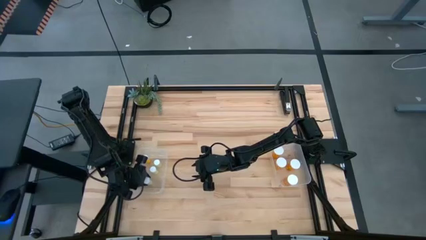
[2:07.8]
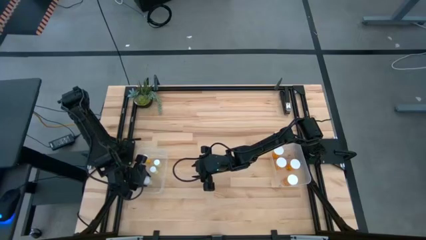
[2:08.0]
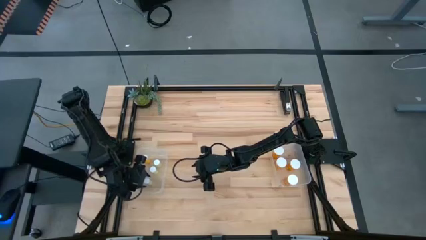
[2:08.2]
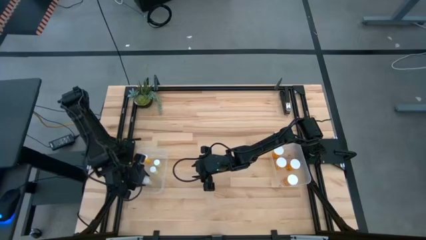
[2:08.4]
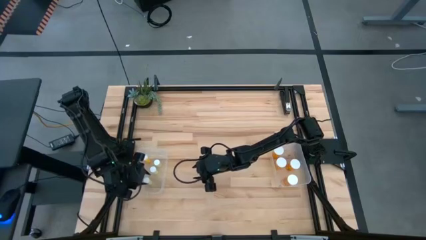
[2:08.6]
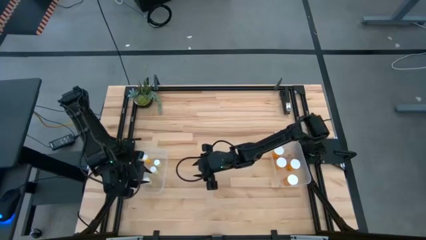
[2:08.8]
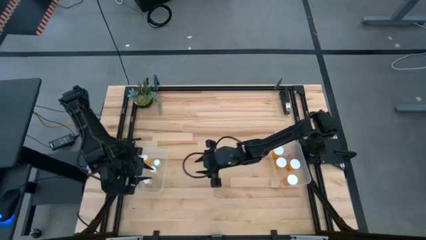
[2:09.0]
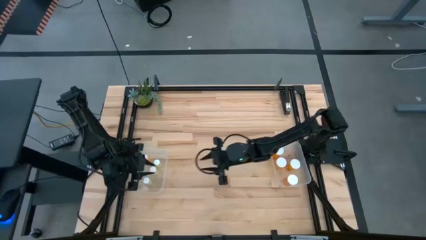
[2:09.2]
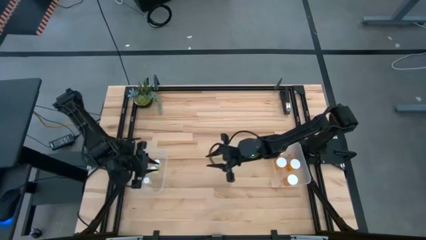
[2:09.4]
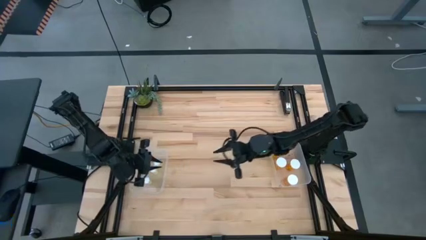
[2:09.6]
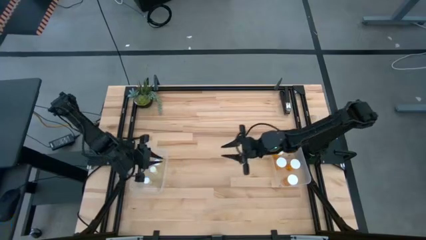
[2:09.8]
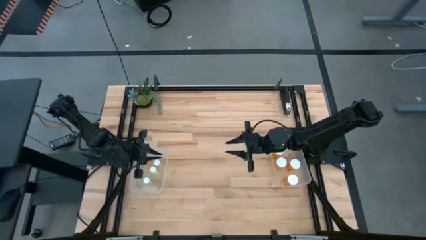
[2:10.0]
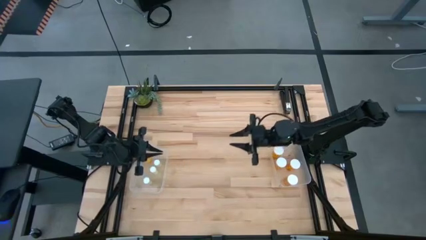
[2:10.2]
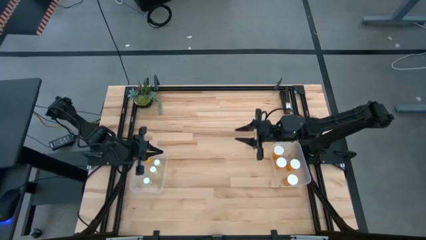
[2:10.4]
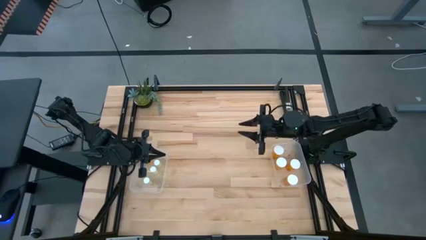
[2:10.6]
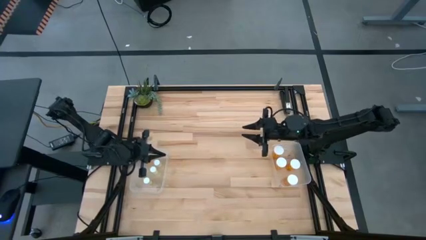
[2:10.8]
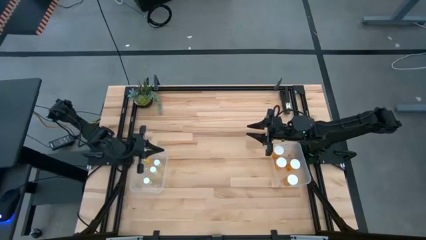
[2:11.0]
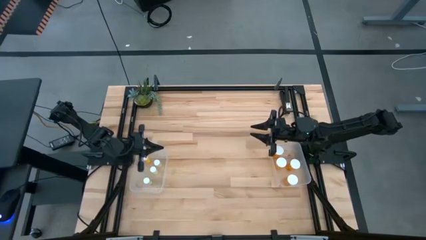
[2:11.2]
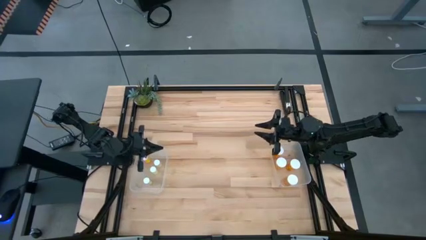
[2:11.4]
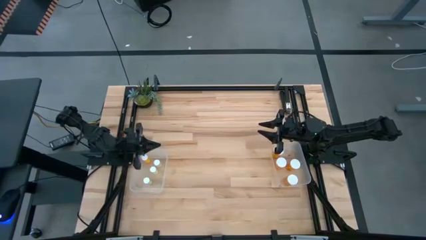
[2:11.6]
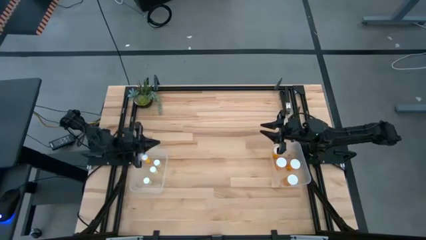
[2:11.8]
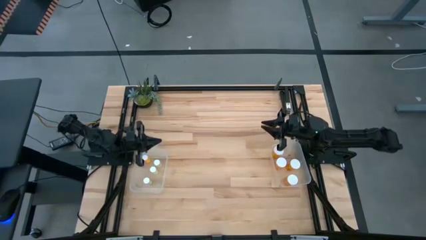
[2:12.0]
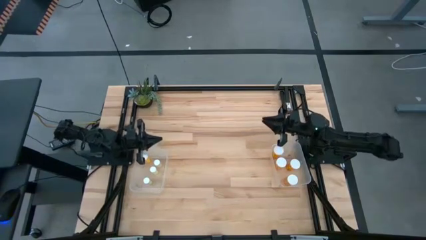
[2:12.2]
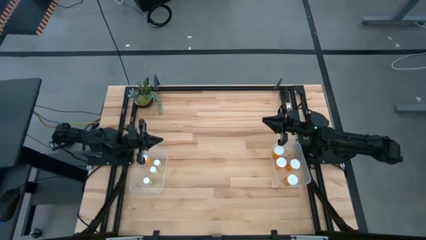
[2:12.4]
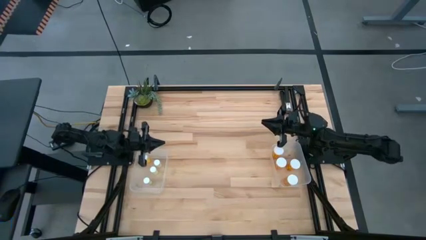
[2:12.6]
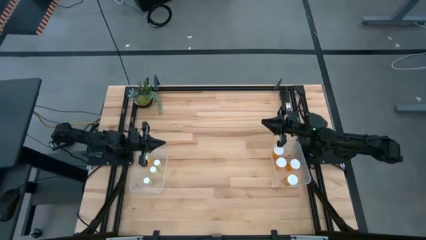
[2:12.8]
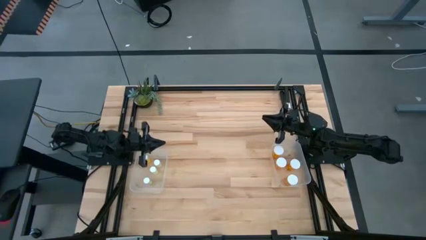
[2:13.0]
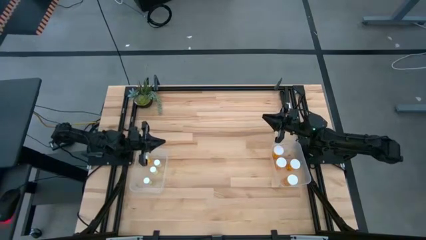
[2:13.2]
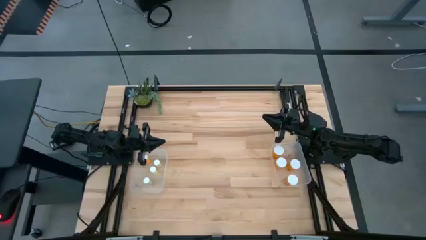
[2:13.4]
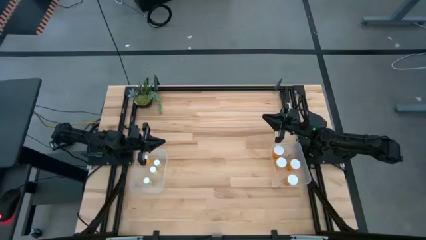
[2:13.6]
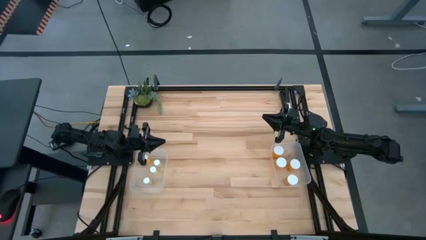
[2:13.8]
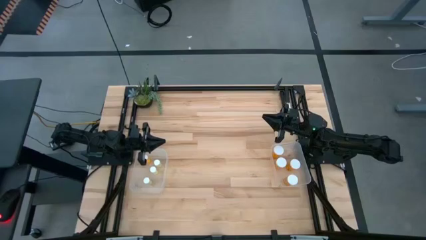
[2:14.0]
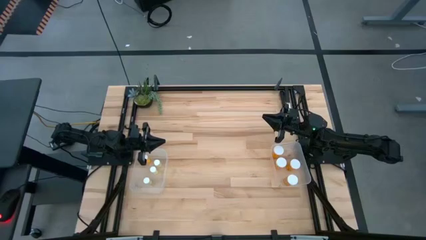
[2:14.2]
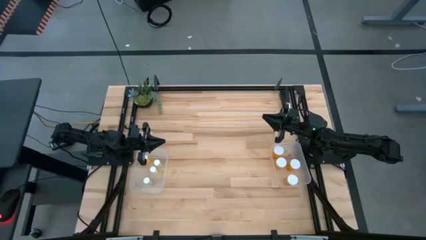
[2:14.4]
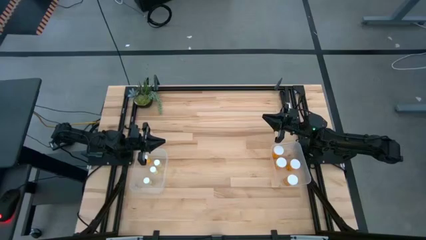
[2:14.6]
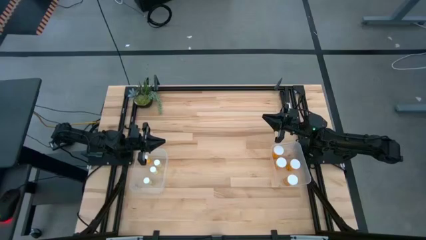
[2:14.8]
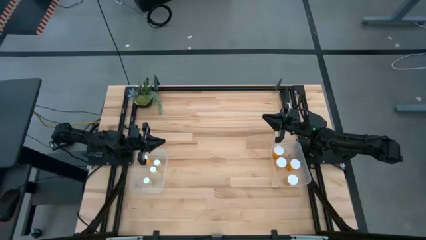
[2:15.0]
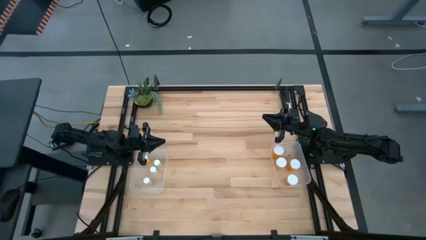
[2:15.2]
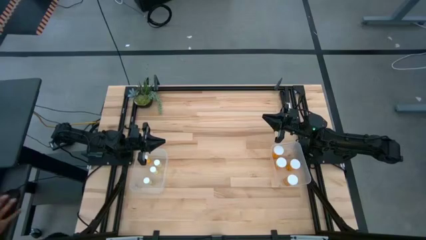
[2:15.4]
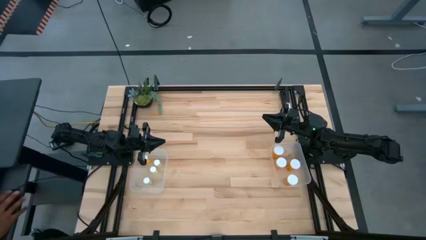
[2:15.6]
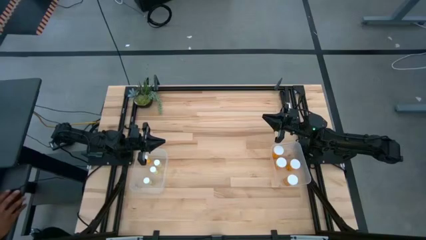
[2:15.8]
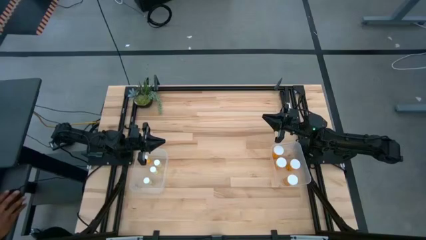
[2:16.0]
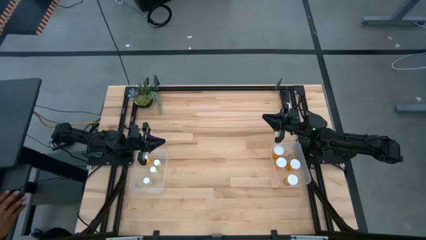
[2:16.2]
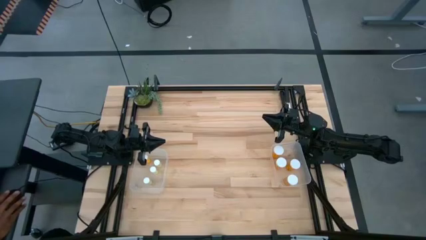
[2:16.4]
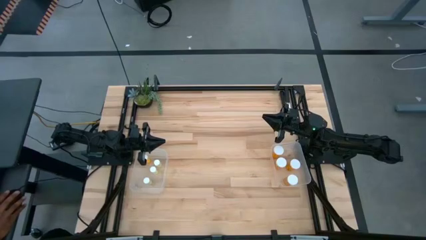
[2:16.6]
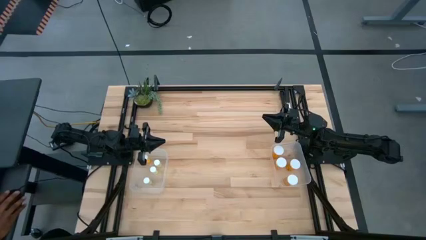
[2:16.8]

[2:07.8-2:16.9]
Task: Pick and place medicine bottles into bin by pill shape (circle, oval)
Return to Home Position

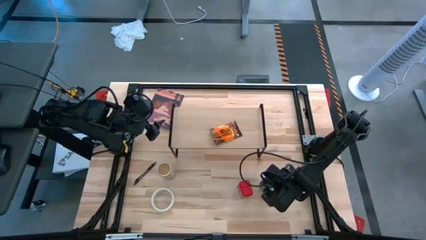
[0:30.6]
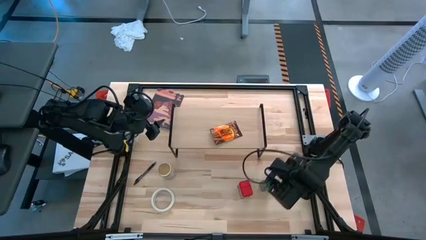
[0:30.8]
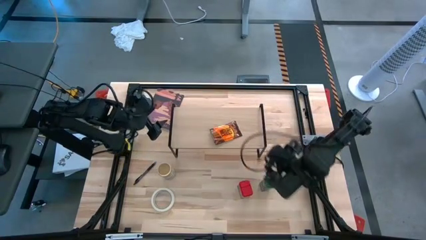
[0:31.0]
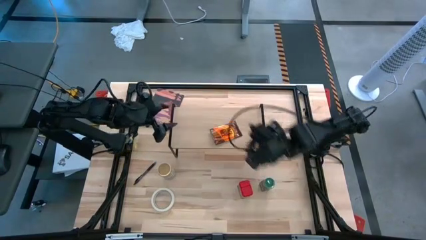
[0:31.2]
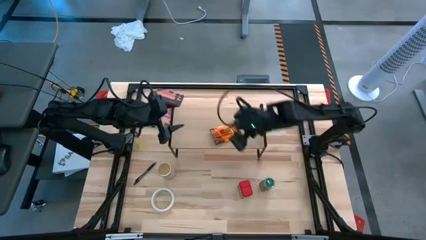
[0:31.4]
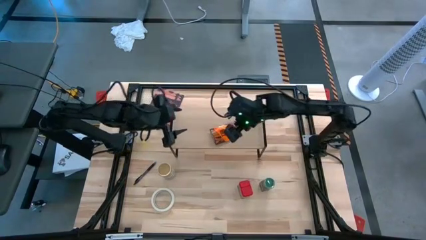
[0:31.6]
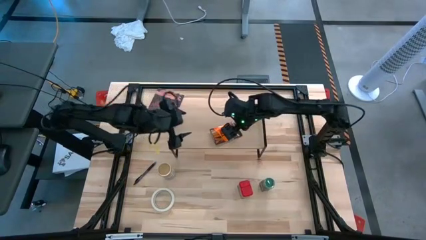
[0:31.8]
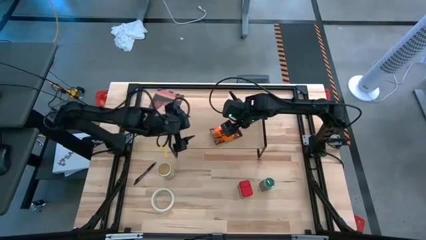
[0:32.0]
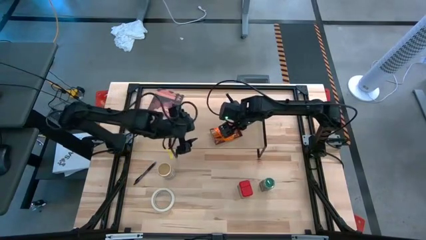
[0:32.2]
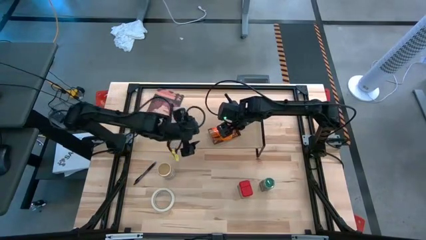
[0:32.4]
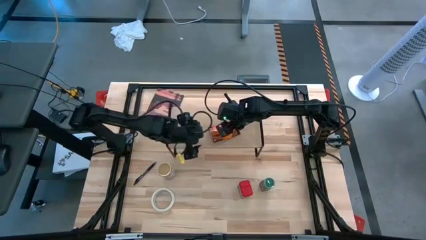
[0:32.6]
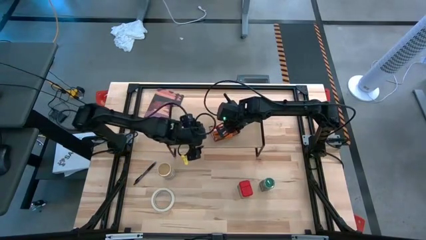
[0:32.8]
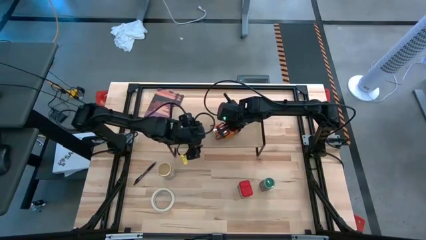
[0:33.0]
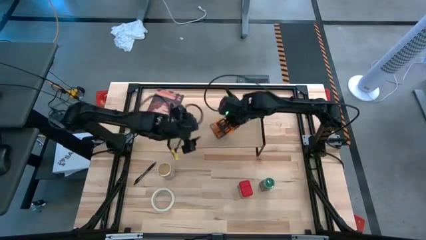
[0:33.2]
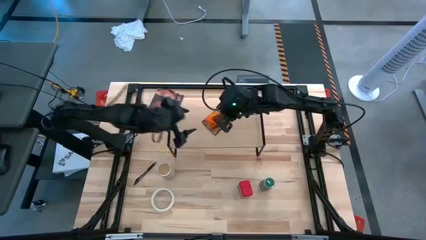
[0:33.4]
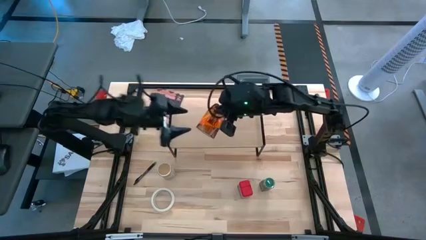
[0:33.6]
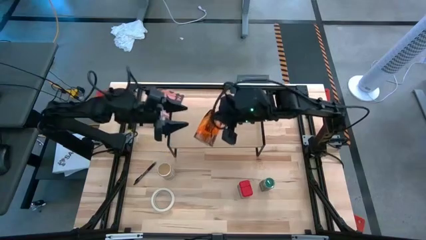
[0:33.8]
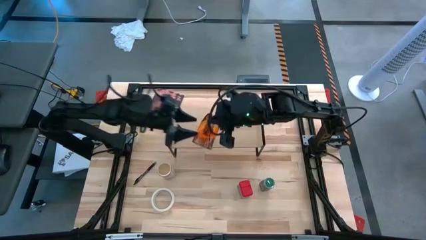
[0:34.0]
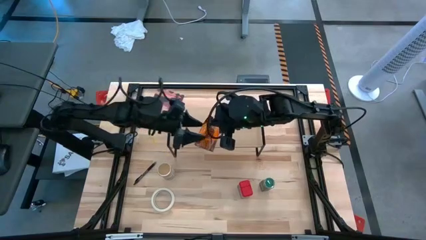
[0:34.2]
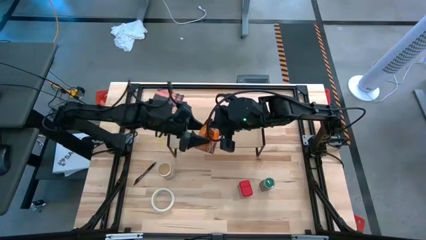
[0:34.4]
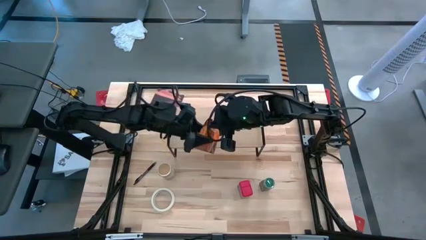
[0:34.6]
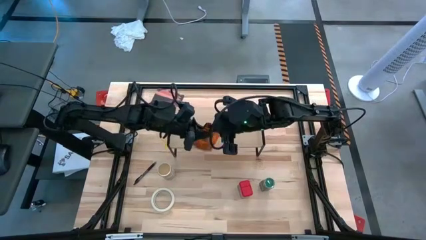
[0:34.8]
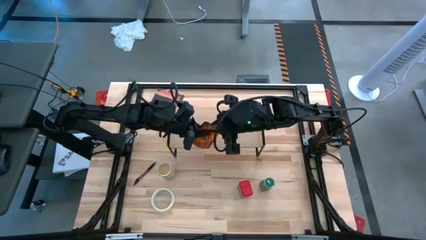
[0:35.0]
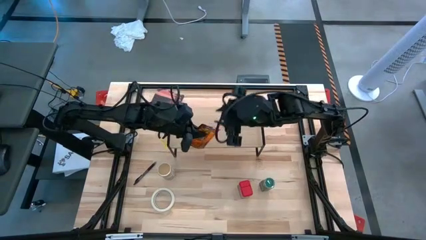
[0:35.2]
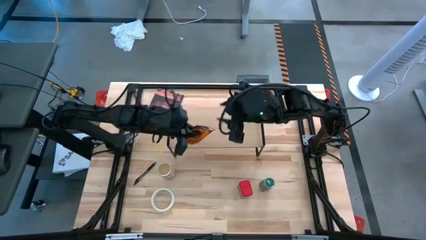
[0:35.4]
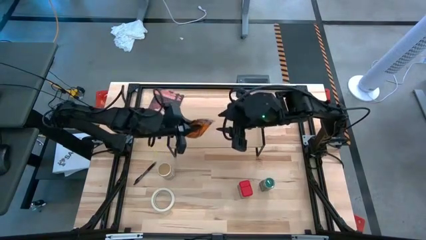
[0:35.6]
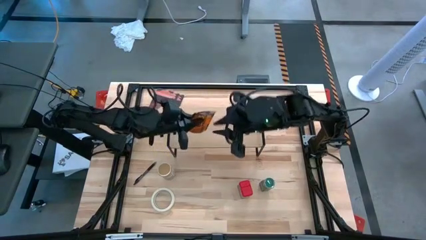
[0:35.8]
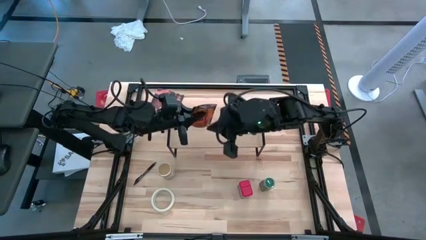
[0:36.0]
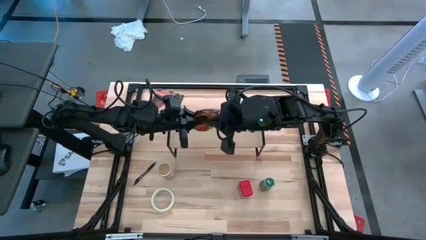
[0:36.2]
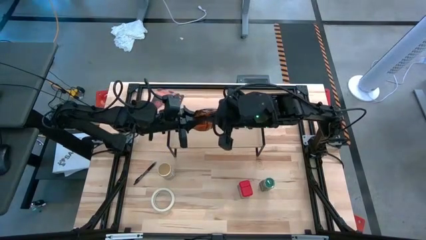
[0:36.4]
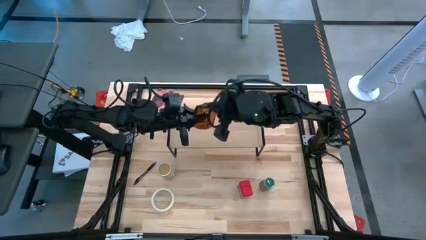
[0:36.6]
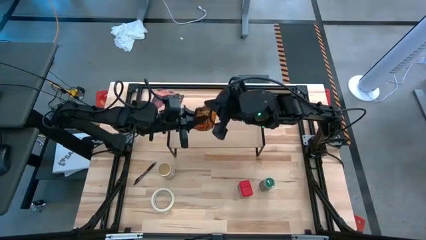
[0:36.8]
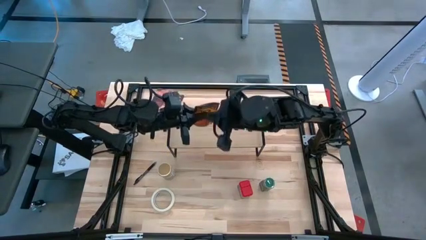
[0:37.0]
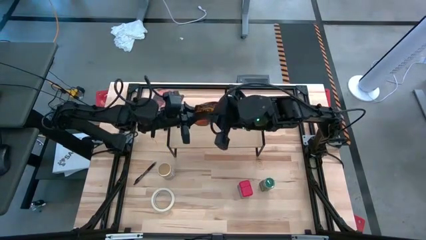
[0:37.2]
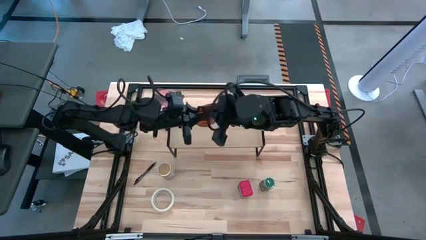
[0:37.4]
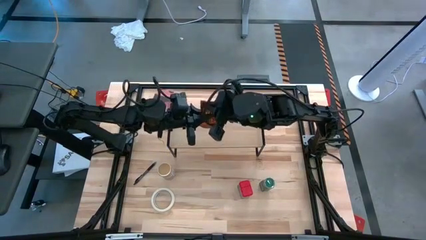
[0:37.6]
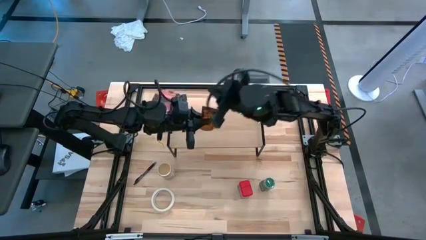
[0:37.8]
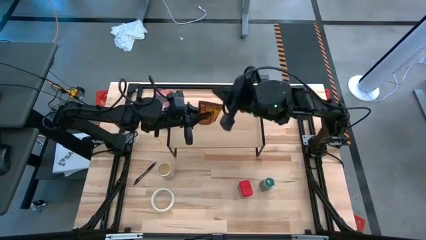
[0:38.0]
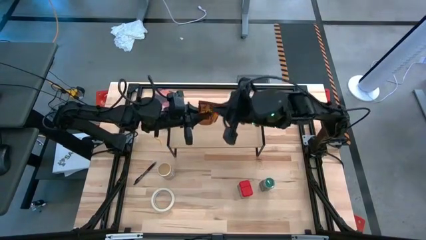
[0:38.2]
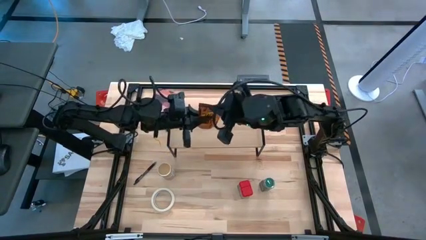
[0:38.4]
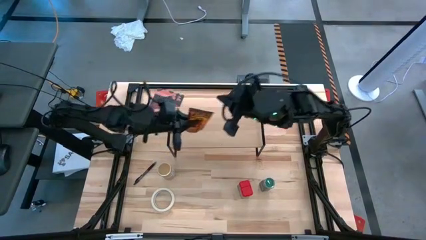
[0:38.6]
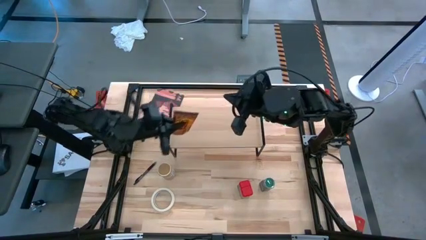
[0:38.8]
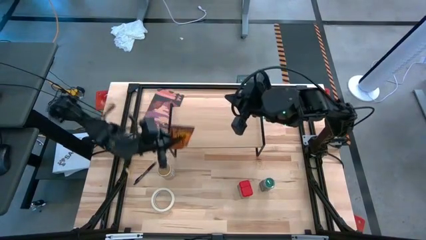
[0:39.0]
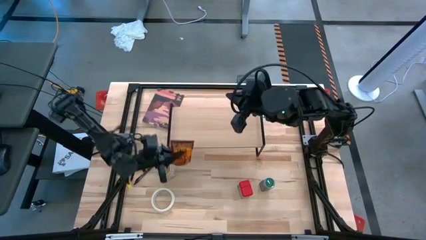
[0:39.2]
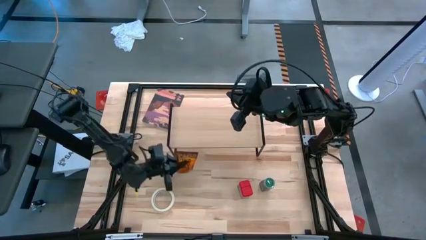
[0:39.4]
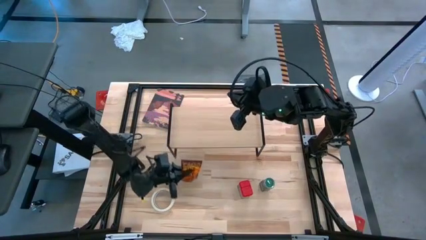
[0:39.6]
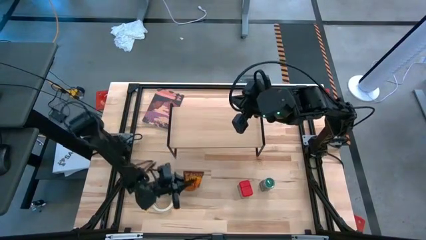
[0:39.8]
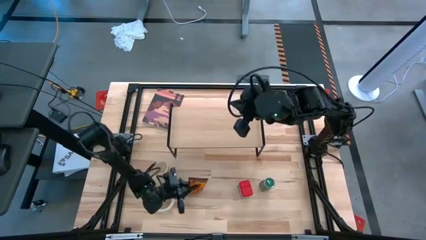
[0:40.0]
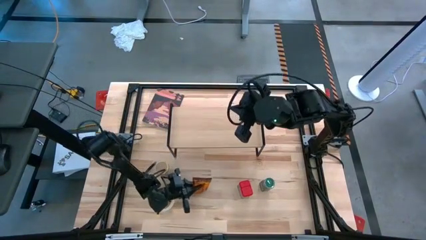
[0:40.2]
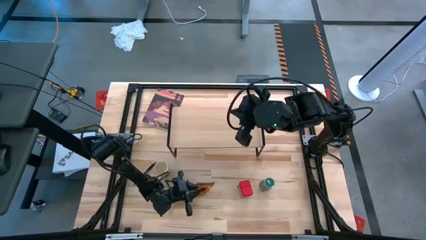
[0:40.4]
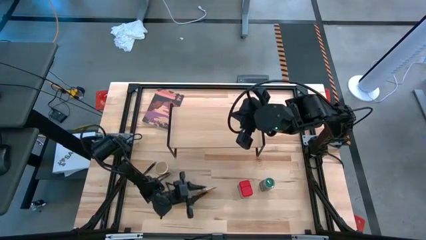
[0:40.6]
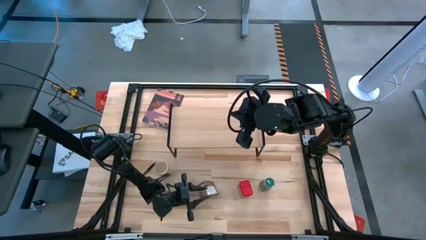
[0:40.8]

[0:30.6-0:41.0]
Task: Shelf spices
Remove the brown seasoning pack from the shelf
